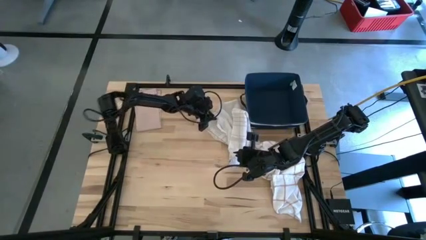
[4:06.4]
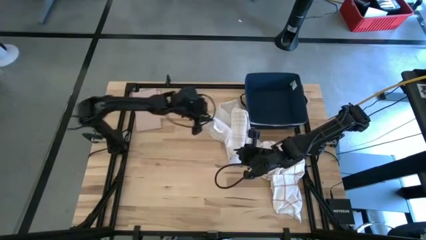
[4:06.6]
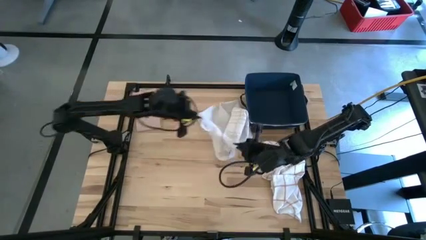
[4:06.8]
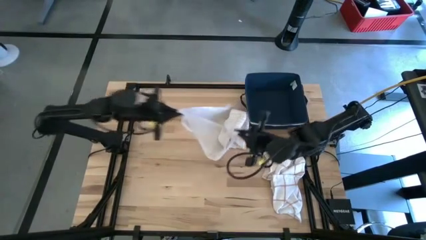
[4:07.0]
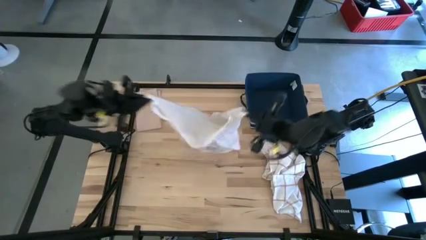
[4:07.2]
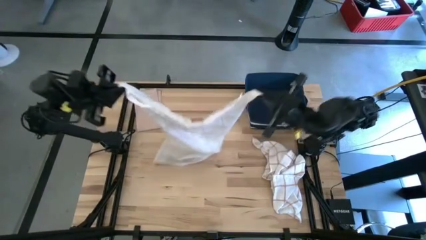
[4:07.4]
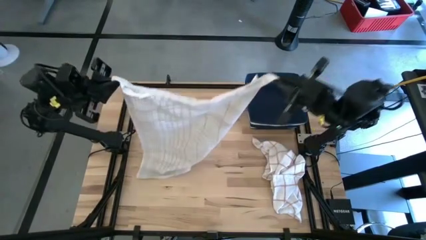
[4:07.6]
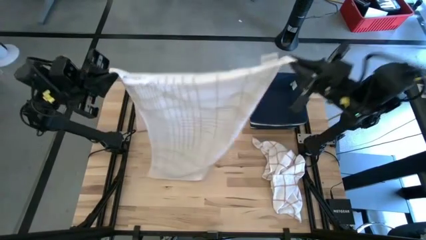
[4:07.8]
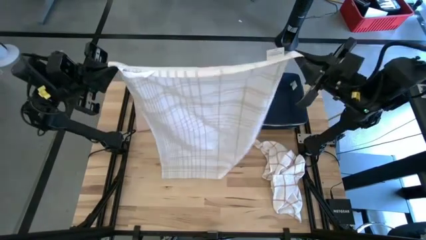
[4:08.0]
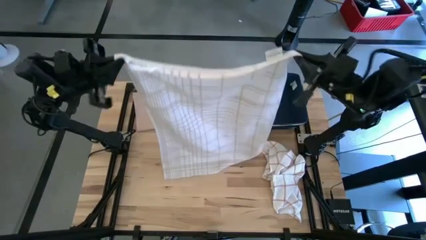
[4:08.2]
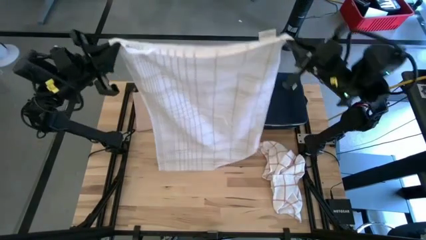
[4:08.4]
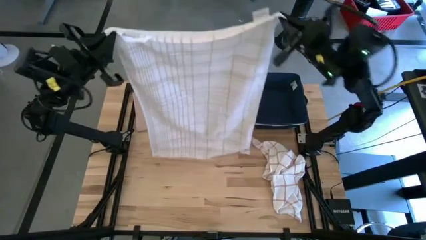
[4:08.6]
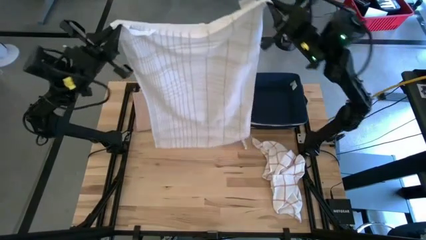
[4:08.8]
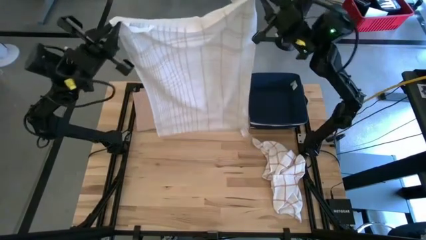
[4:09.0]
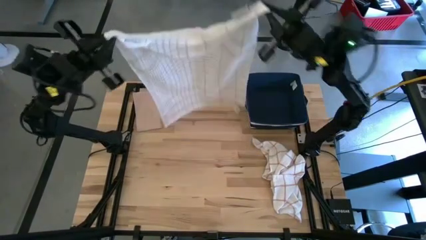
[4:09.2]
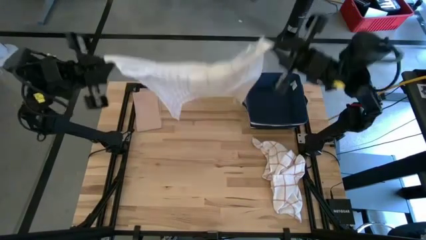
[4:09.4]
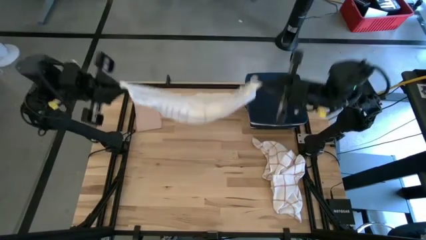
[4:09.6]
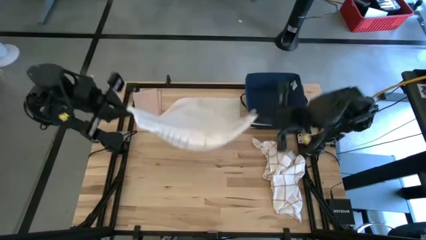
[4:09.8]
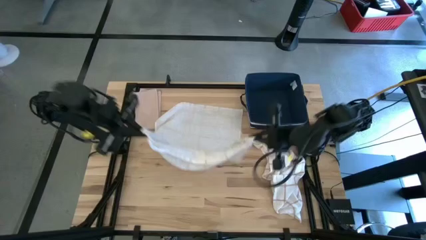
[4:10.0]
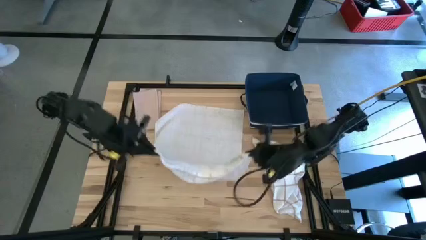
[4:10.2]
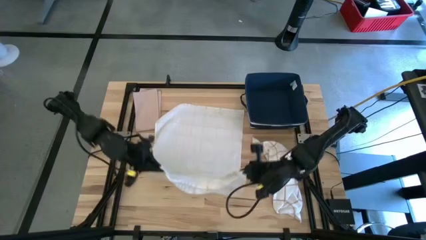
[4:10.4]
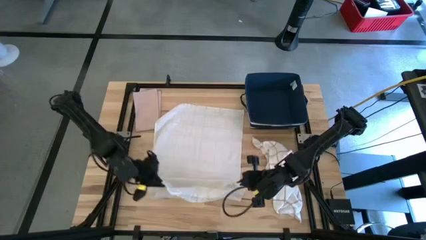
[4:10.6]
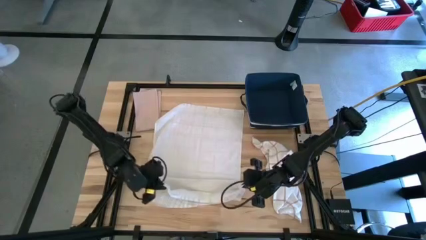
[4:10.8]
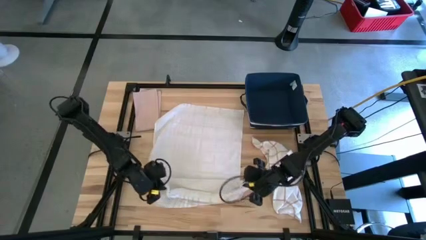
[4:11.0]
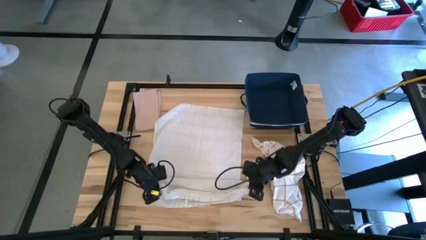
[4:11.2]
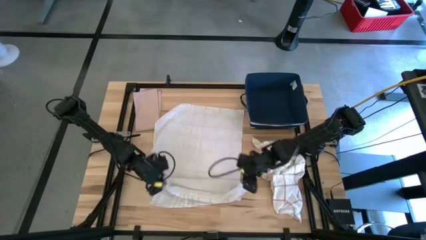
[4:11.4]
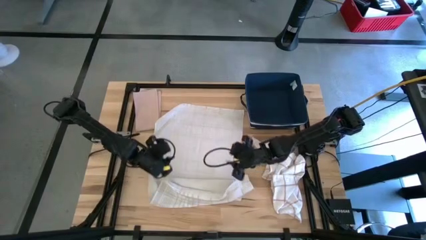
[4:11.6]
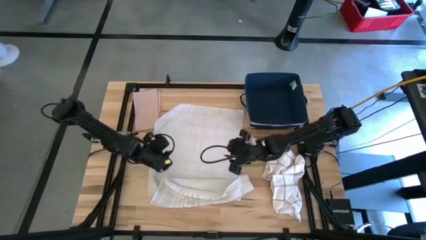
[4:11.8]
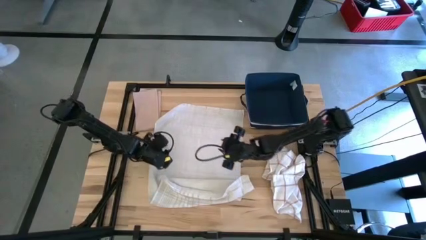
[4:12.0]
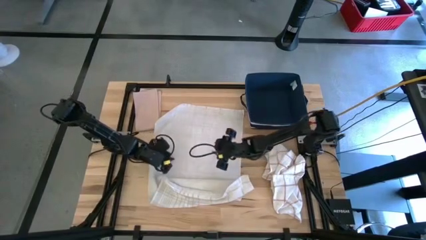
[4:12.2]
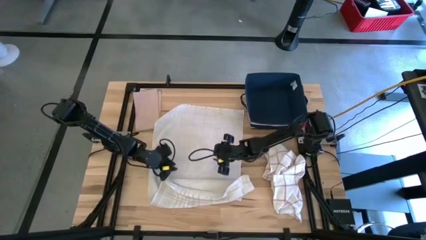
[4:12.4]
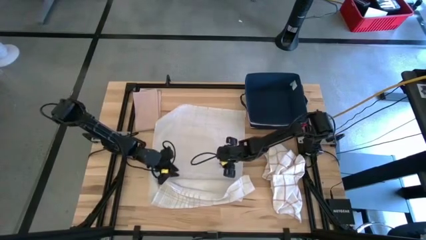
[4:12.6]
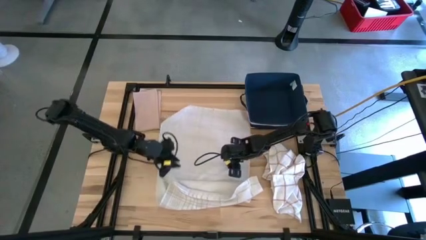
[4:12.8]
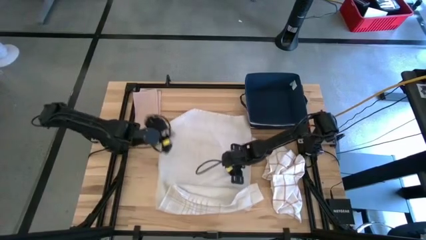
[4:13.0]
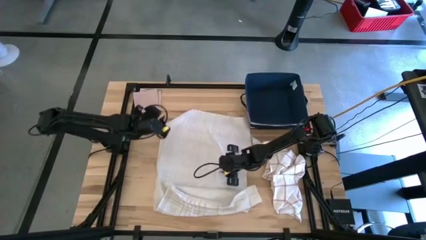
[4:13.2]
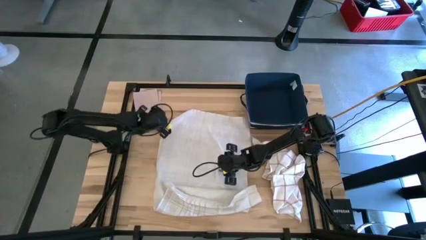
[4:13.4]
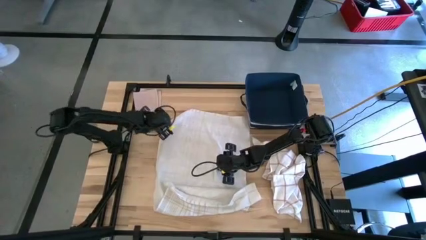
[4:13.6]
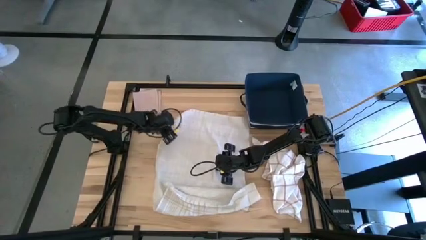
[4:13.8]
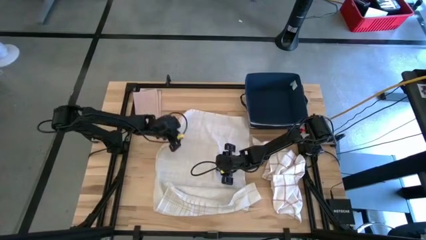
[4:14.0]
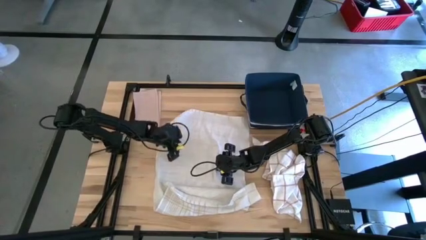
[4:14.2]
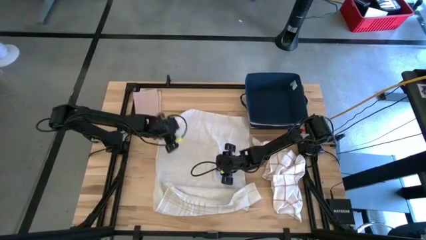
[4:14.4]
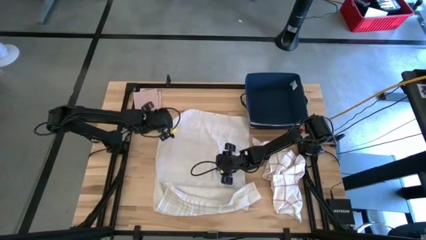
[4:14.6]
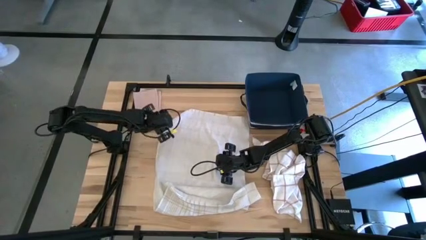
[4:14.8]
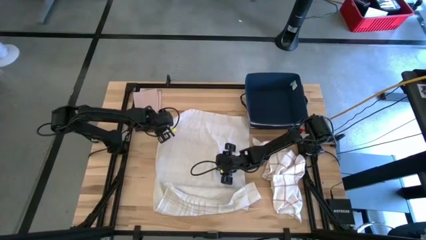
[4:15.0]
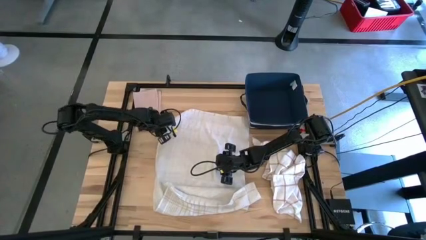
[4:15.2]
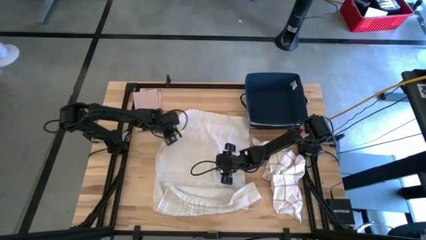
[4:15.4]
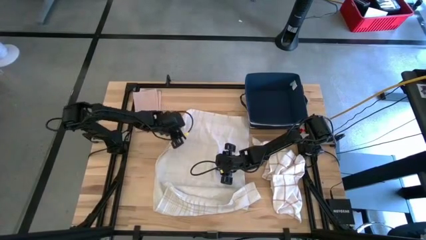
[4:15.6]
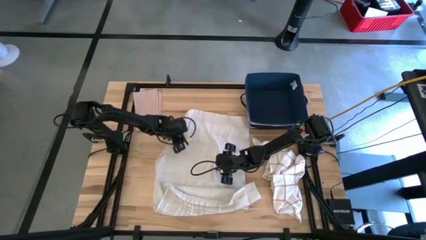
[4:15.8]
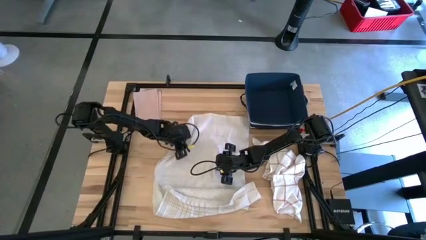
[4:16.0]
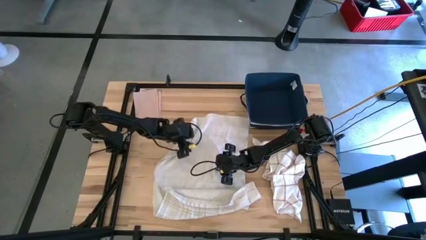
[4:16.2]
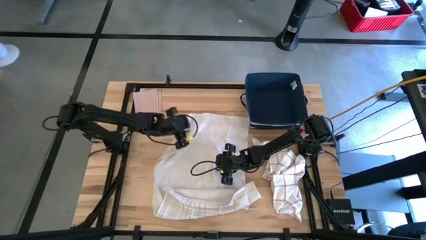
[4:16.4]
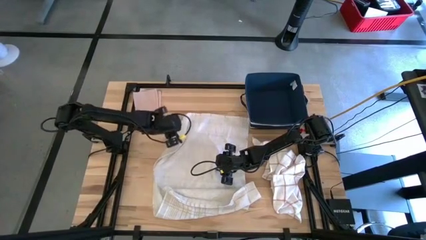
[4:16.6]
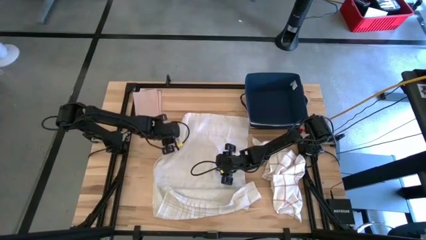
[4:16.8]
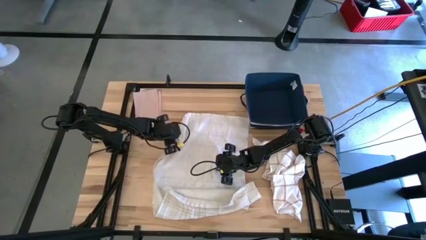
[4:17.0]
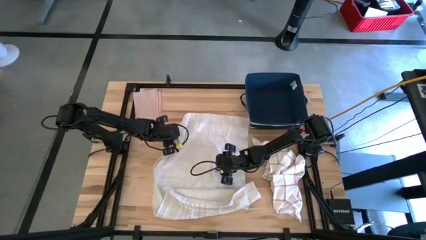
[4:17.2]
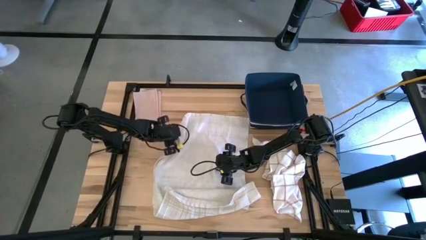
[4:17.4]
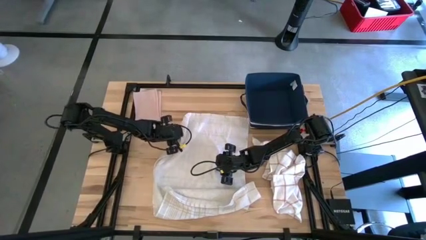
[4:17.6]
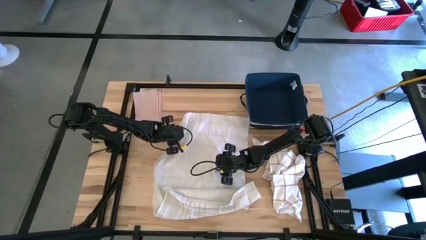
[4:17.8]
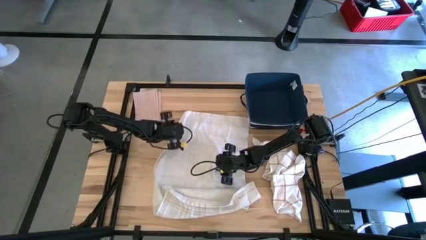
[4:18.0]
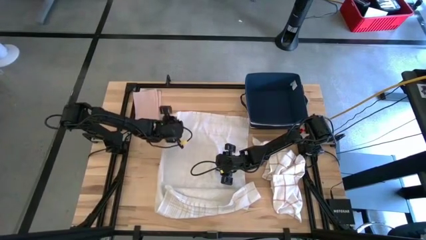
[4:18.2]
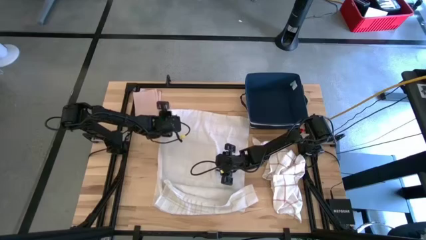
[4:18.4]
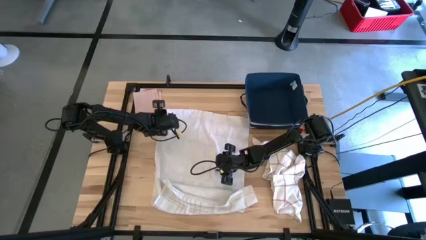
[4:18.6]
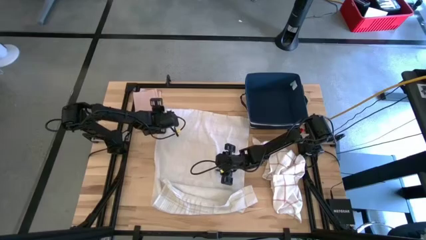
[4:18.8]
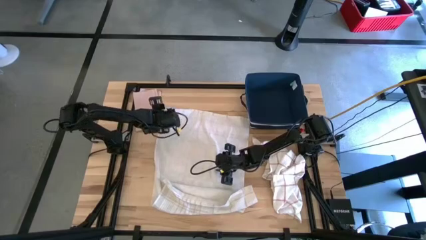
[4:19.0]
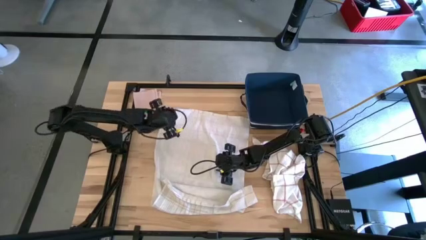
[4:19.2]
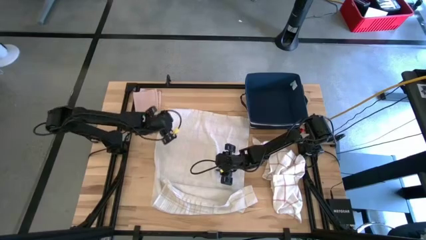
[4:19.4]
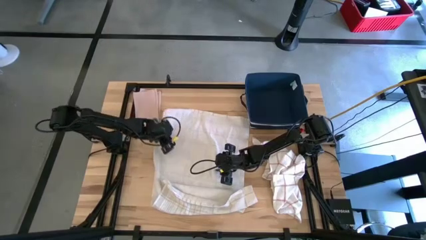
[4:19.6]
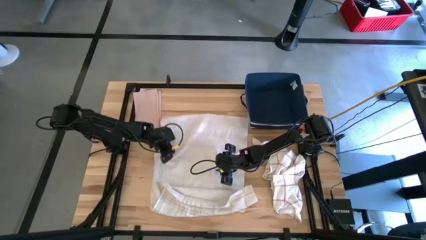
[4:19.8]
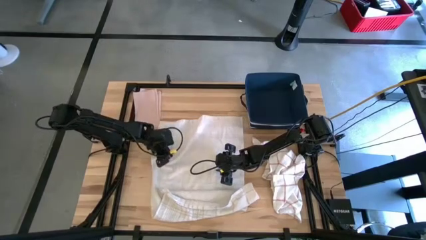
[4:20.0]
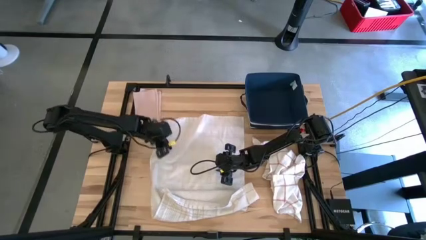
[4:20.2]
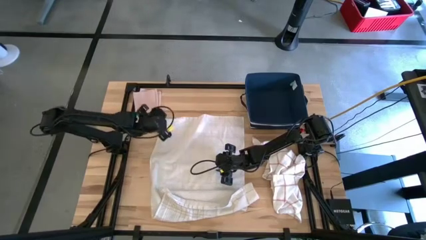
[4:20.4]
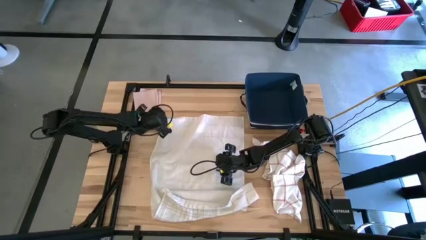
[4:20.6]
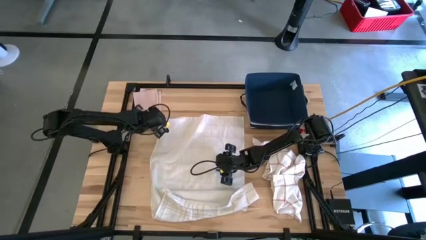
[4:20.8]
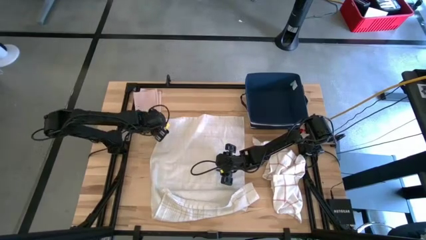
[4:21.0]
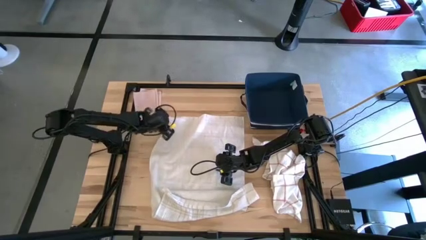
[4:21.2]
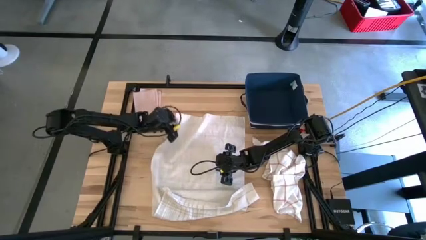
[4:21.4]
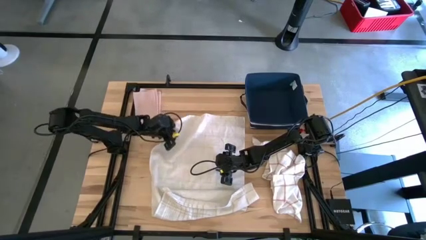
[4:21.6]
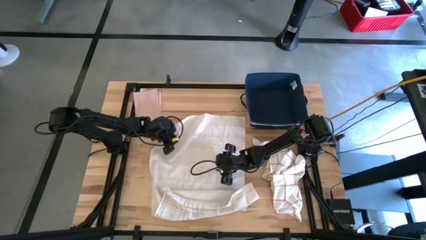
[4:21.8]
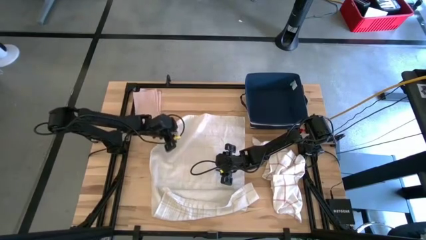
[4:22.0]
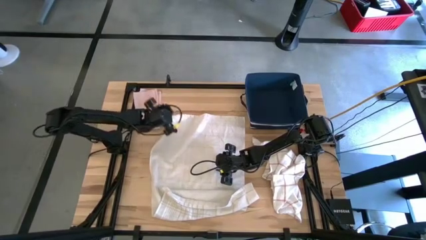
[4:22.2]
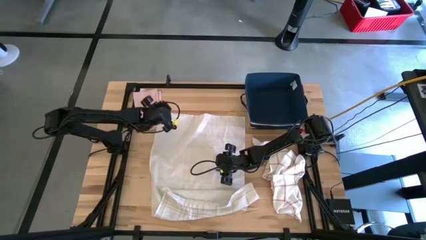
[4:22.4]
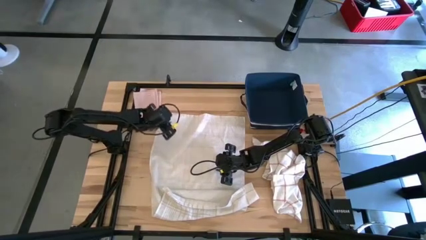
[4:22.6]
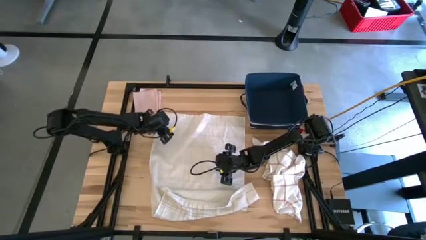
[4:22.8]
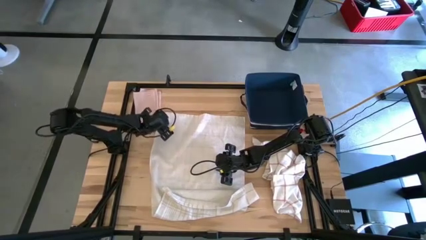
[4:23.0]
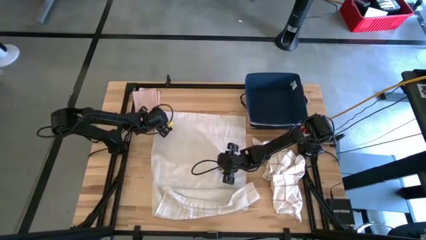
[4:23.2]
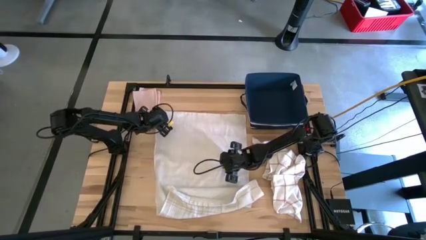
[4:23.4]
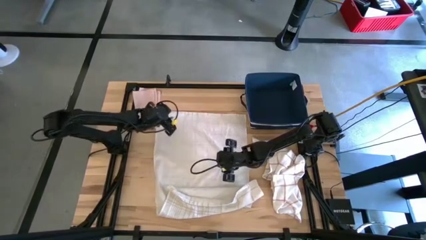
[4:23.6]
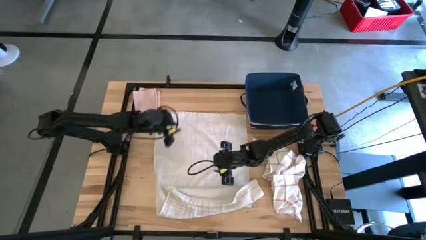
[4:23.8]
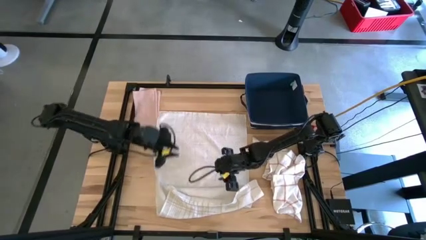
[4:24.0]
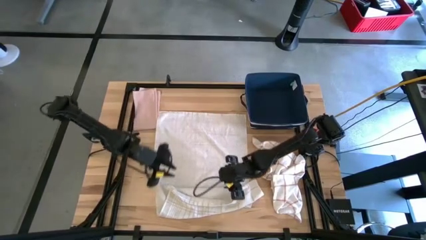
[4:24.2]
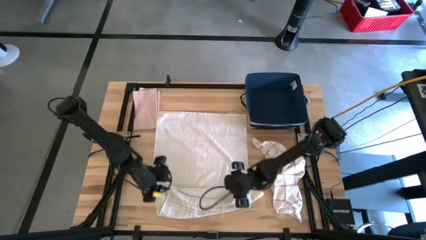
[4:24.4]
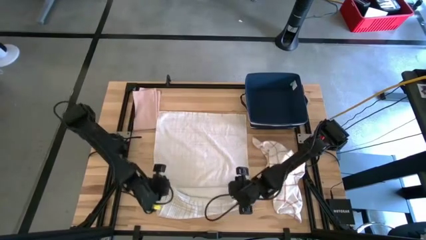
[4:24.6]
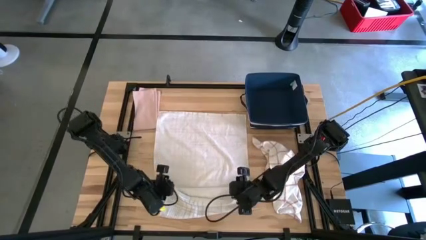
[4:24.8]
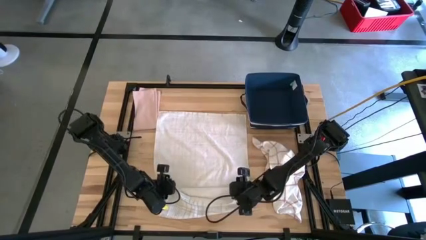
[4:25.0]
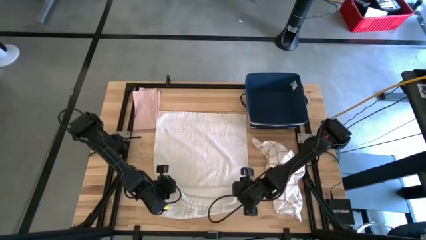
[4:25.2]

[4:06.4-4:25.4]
Task: Fold towel
Fold the white patterned towel
